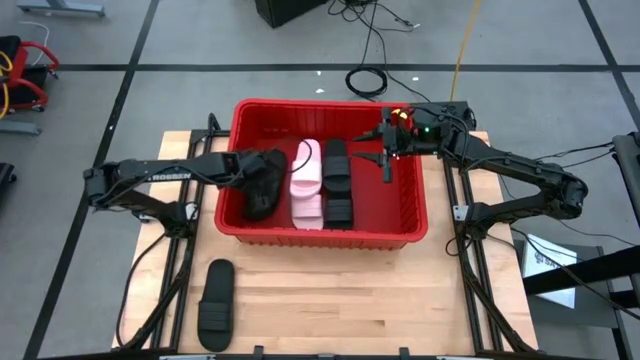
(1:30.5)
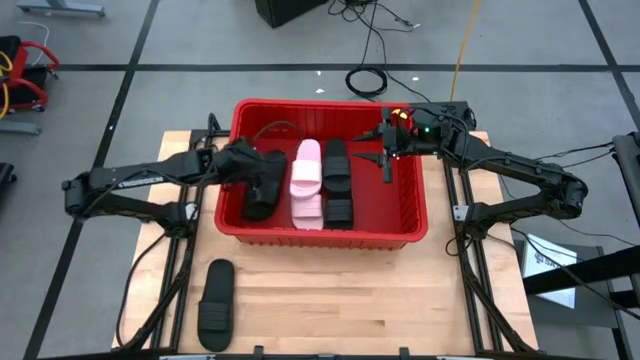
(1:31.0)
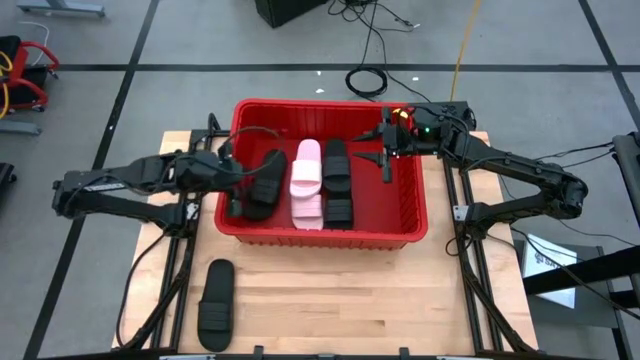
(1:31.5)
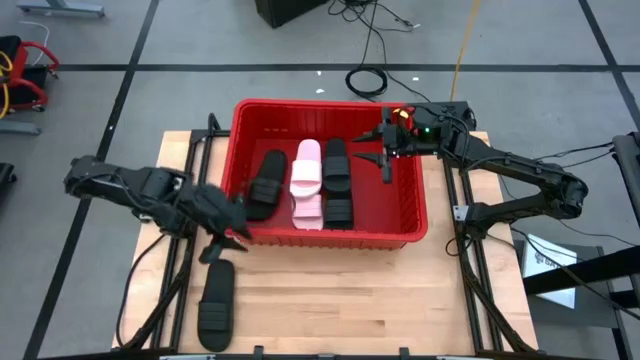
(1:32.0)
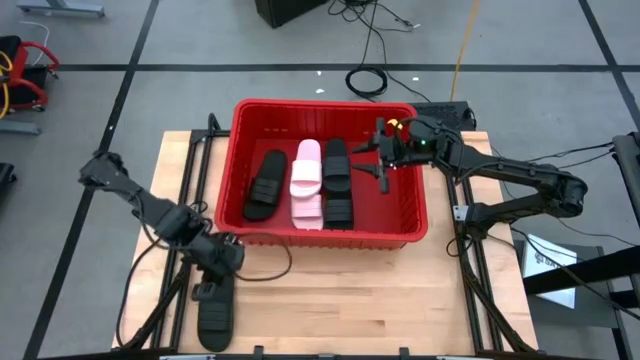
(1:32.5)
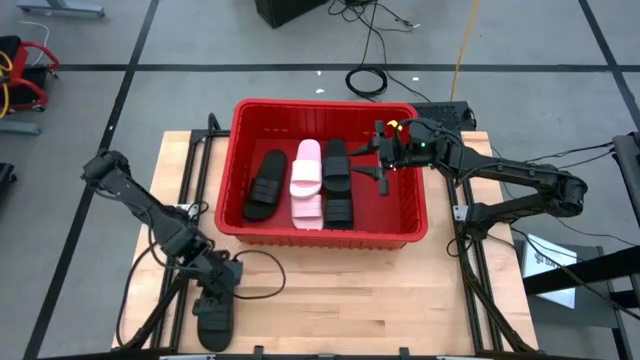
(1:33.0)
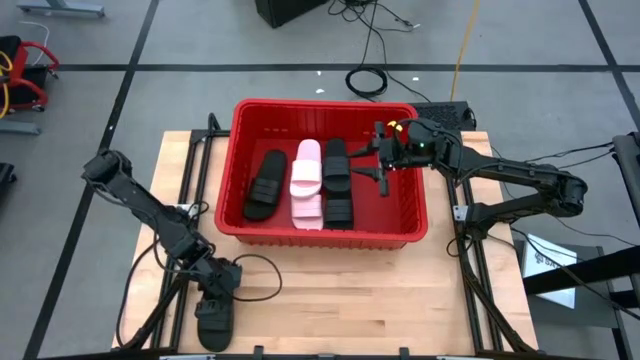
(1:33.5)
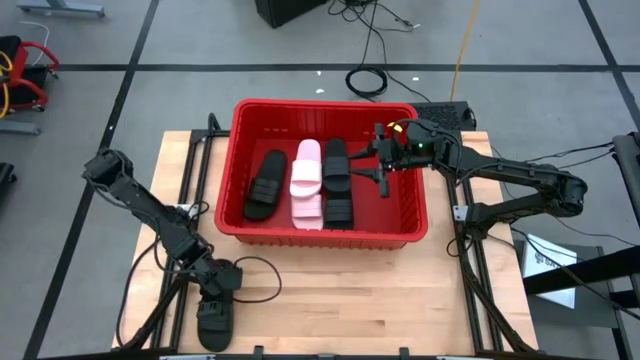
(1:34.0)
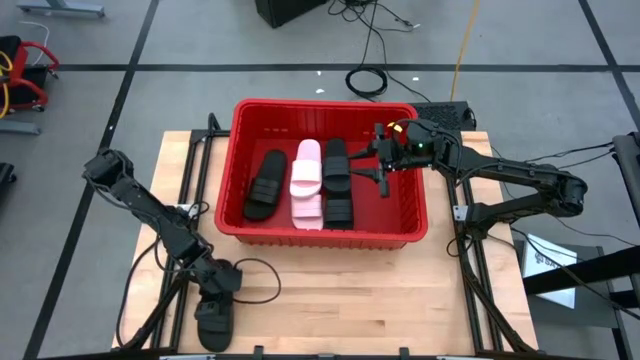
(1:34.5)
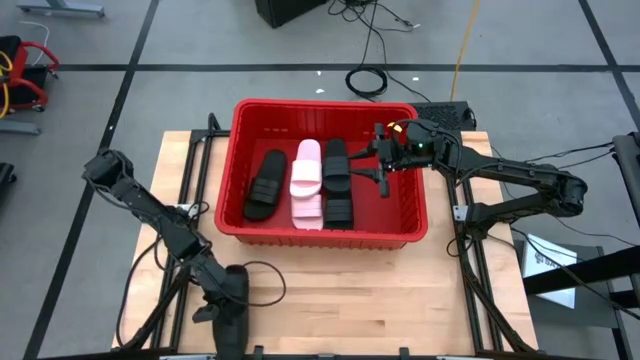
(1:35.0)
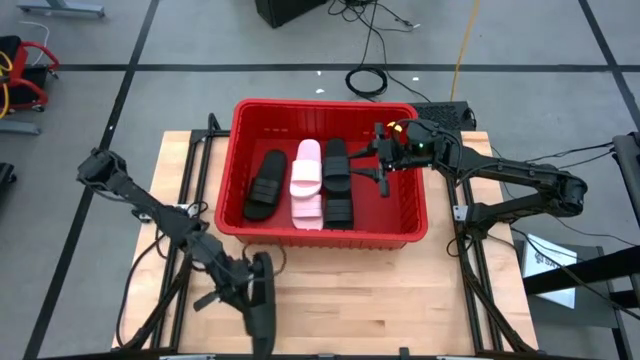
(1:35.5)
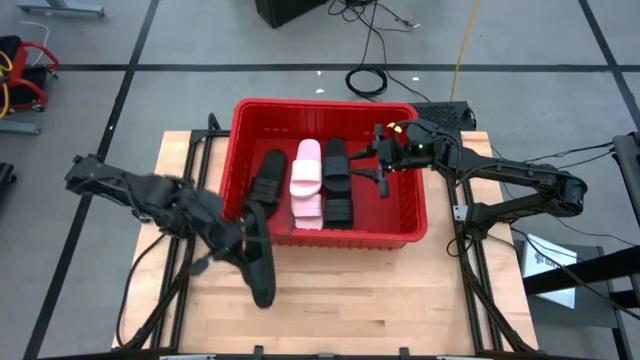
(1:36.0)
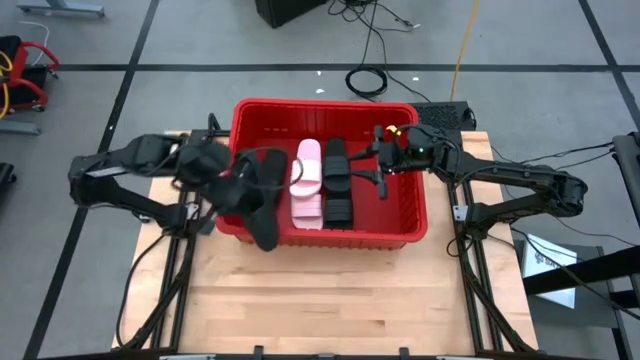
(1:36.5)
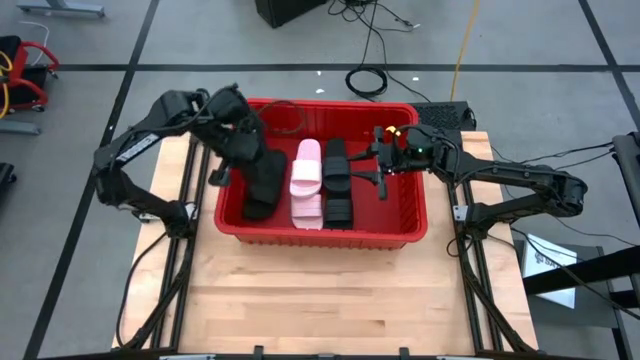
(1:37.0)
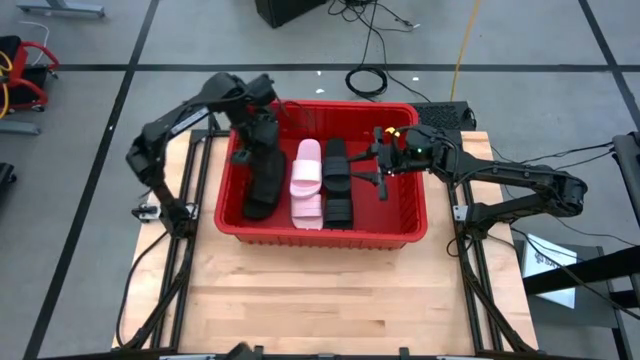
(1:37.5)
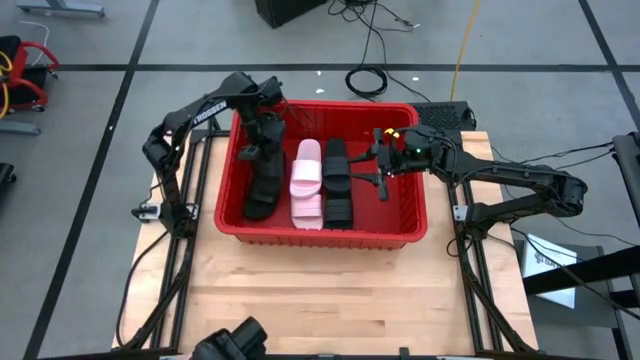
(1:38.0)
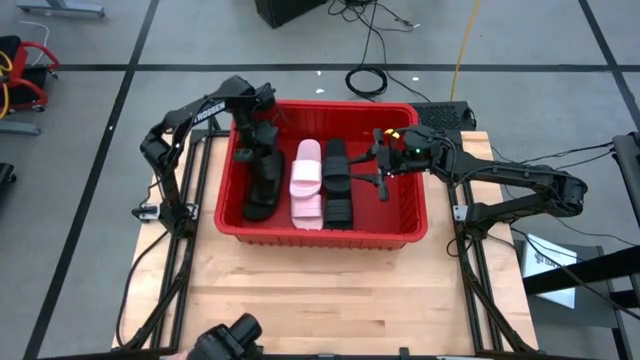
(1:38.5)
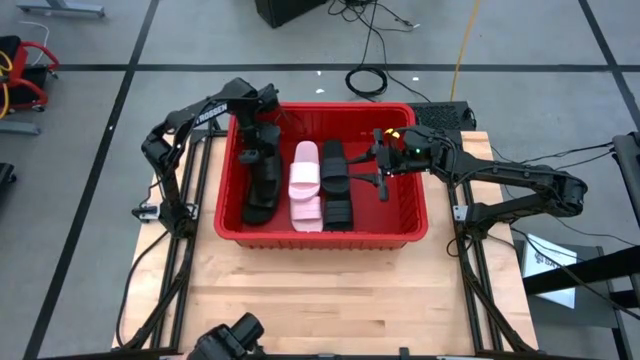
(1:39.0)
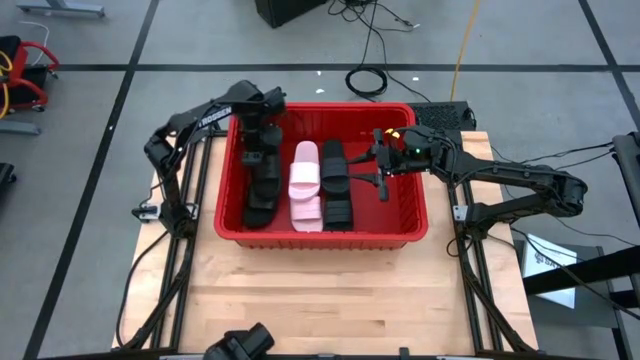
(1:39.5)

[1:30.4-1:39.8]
Task: Pick and place slides into bin
Put the black slide into the red bin

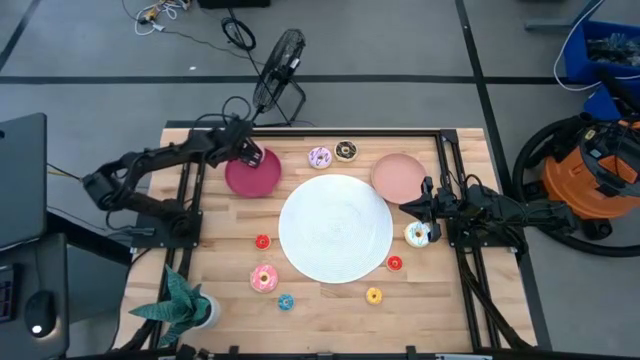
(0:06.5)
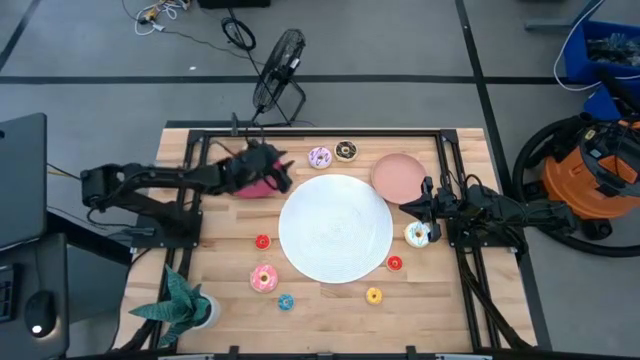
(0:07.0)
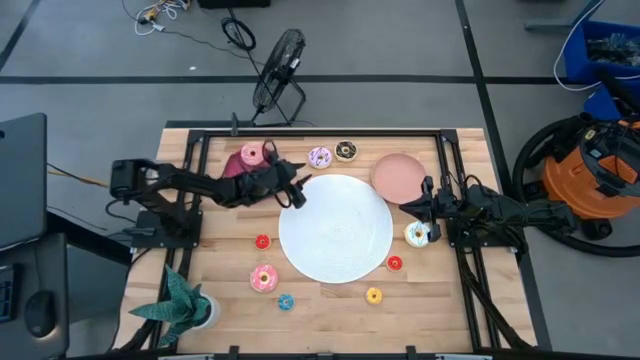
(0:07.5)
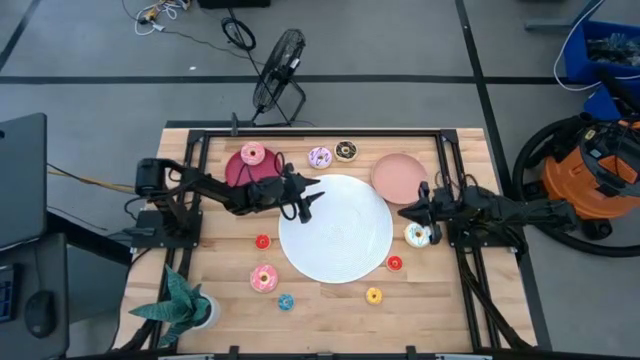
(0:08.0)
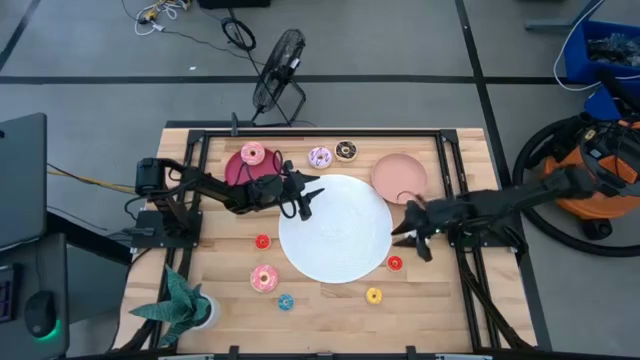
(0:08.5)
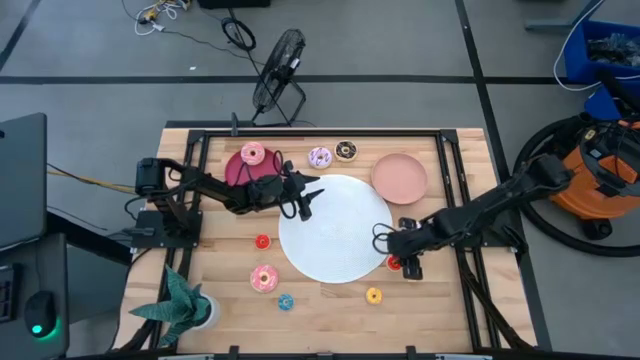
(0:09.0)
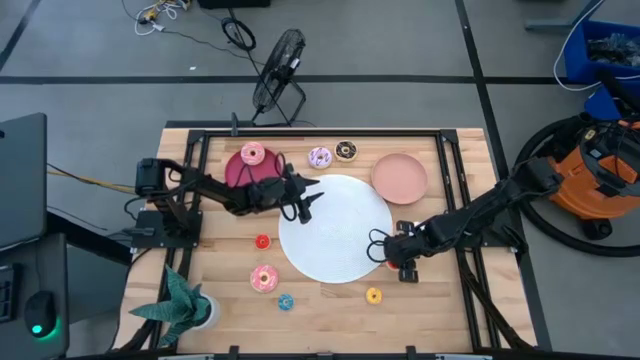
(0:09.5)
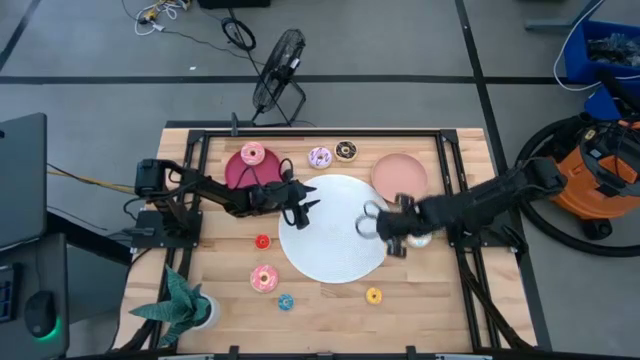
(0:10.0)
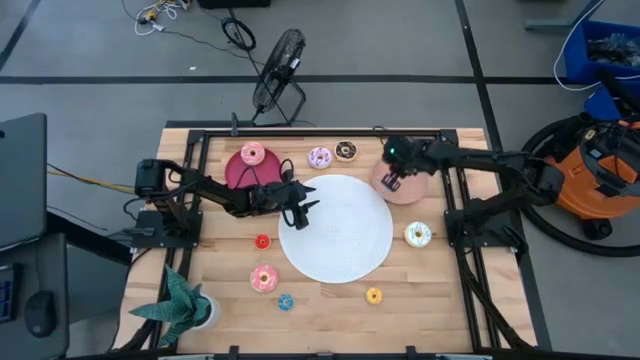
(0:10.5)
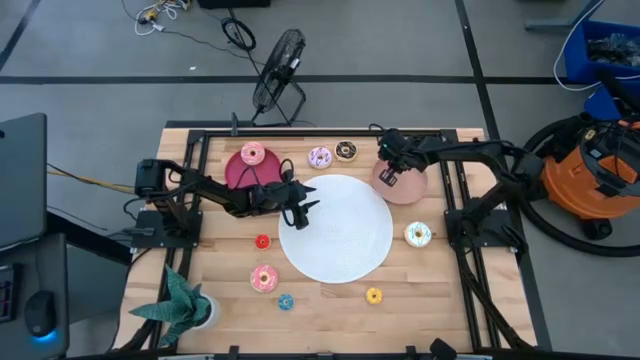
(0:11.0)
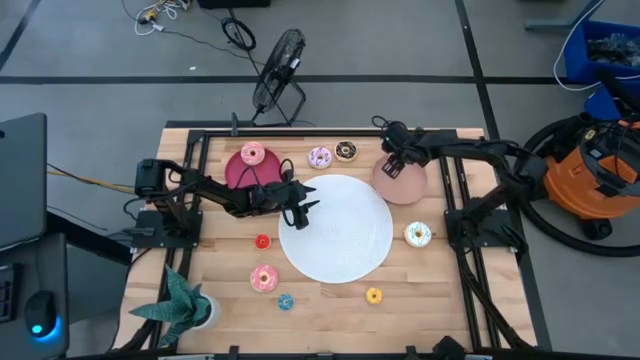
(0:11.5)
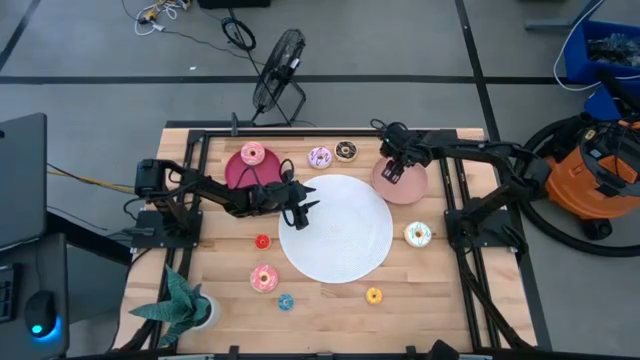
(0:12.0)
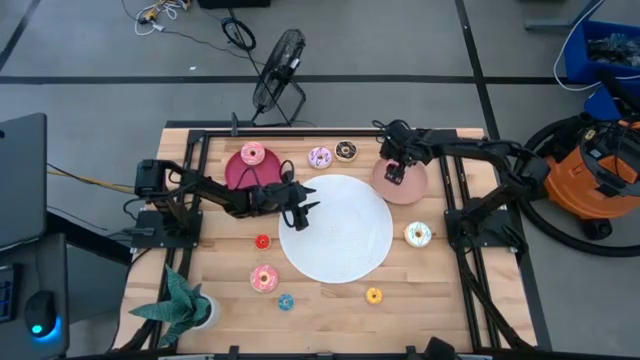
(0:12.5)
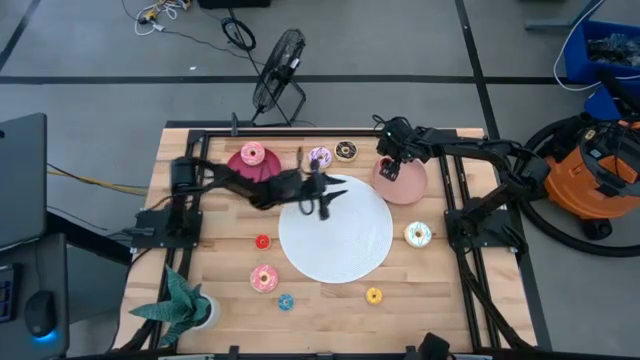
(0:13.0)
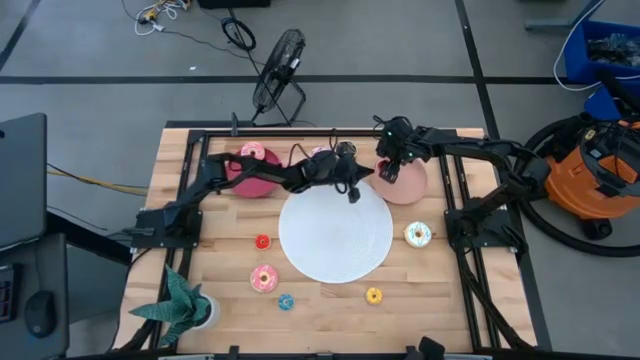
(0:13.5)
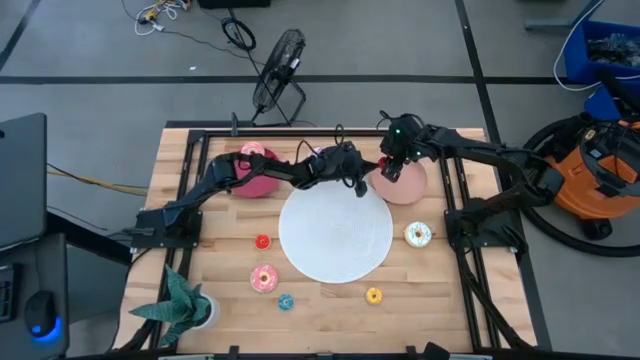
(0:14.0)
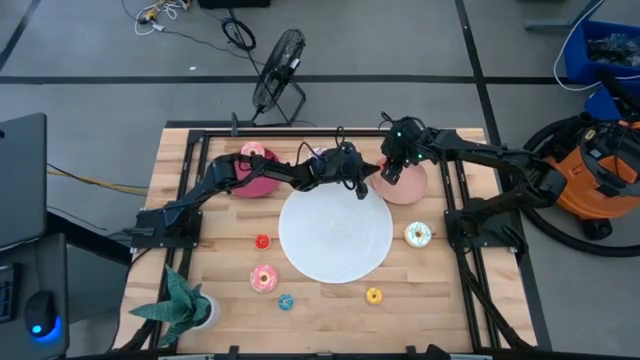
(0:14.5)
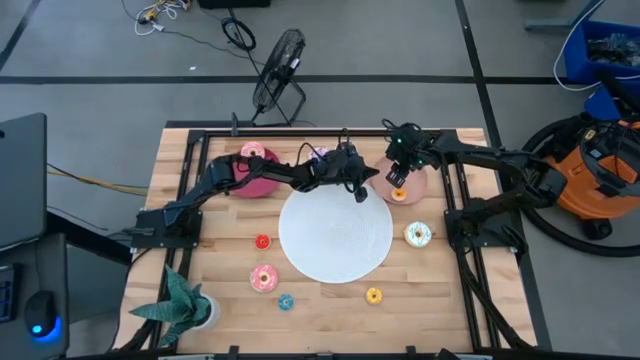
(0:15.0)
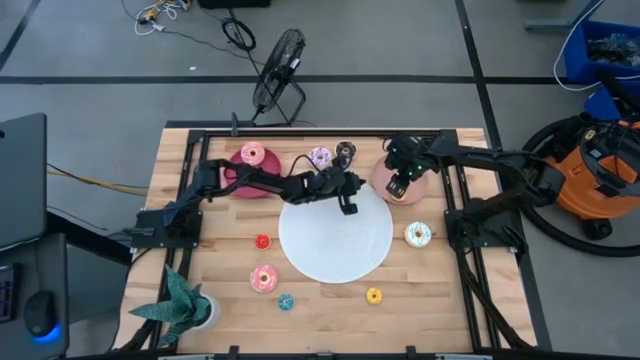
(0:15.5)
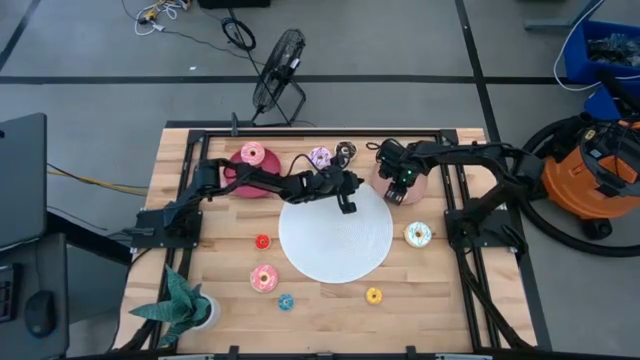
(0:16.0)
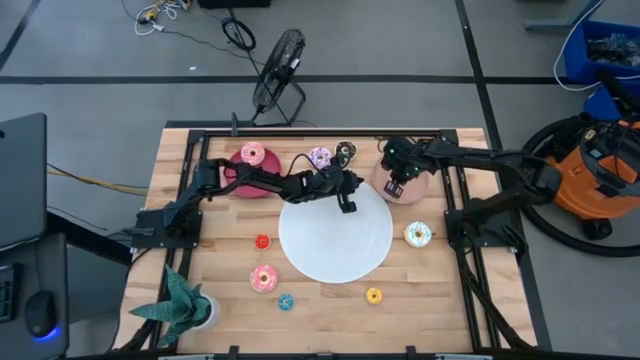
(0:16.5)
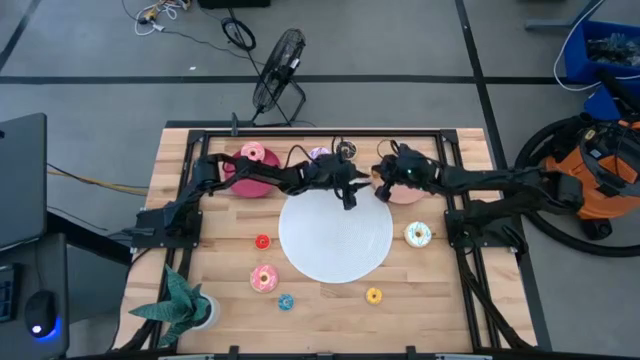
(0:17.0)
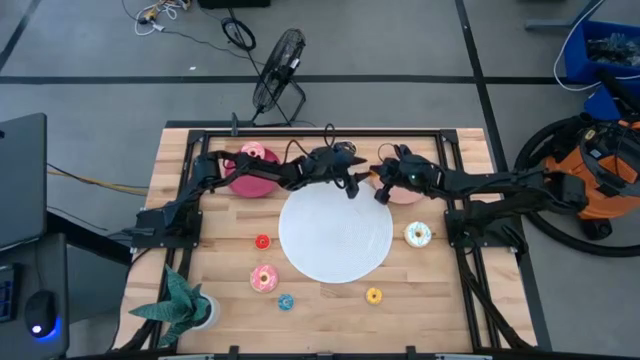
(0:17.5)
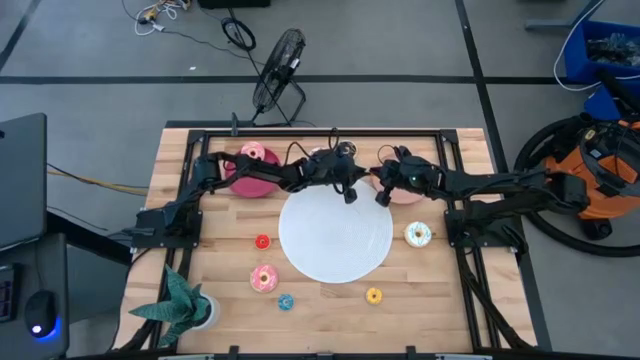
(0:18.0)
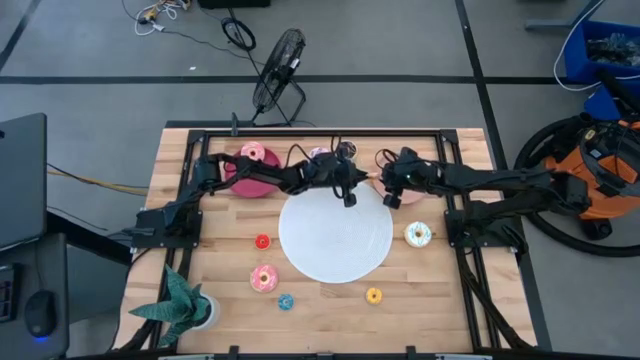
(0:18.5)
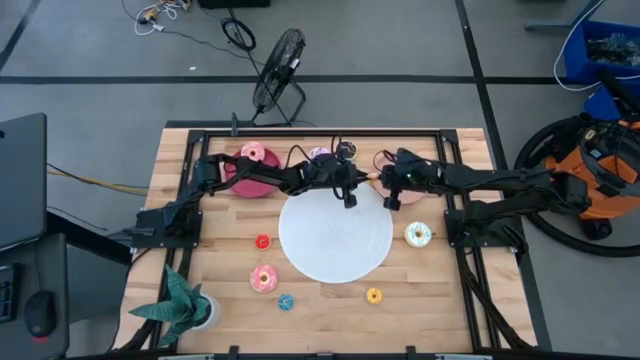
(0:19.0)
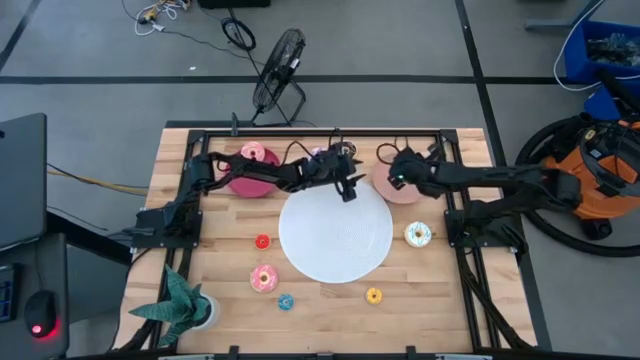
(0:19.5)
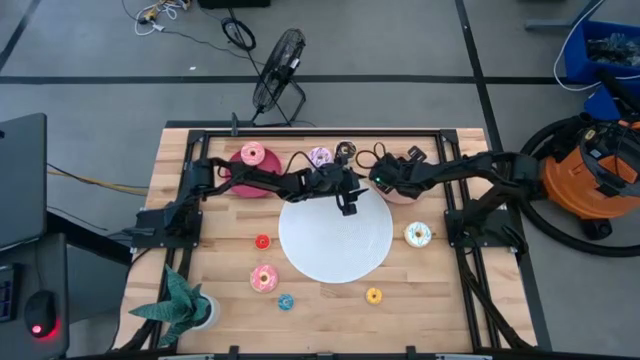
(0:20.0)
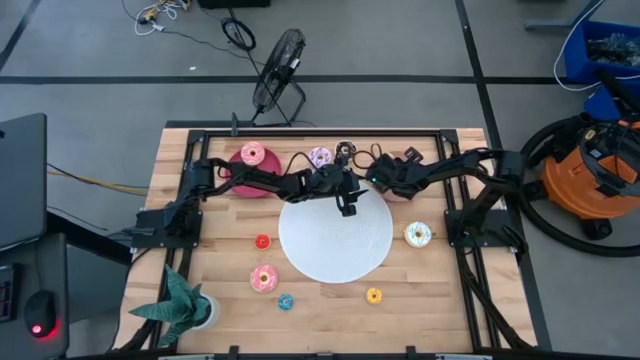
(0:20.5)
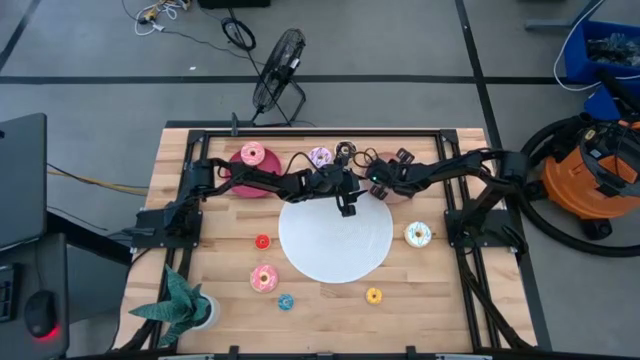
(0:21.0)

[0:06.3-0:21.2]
Task: Pick & Place donuts
Put the right small red donut on the light pink plate
